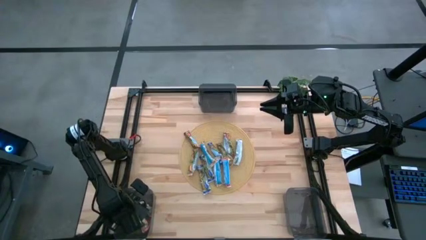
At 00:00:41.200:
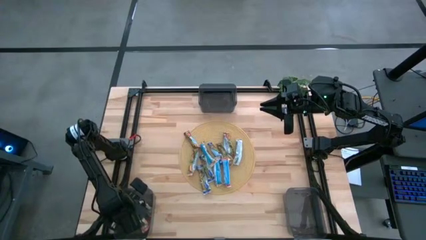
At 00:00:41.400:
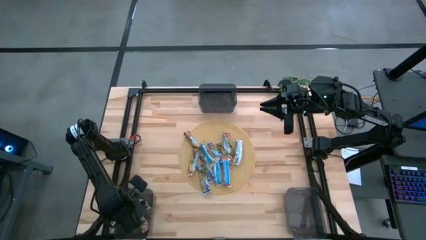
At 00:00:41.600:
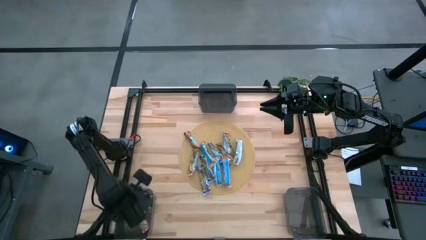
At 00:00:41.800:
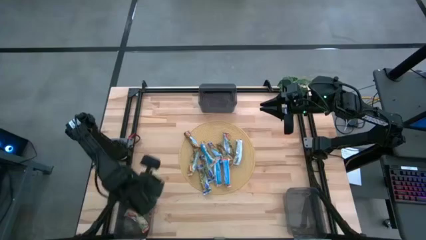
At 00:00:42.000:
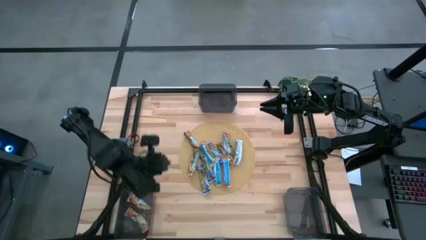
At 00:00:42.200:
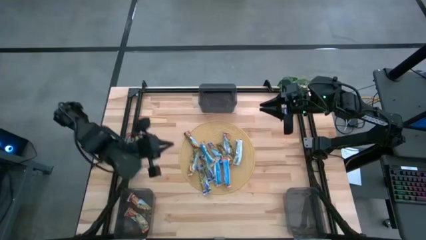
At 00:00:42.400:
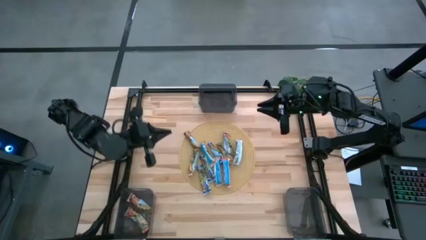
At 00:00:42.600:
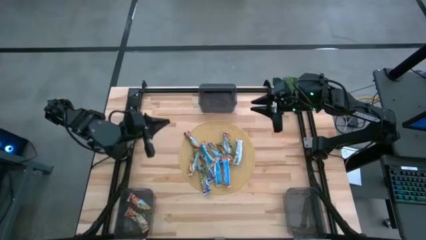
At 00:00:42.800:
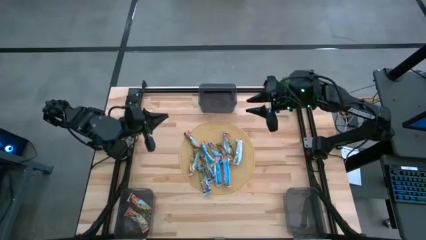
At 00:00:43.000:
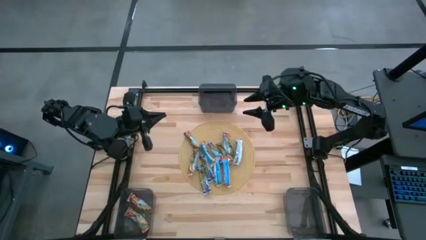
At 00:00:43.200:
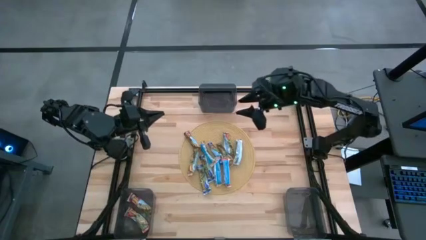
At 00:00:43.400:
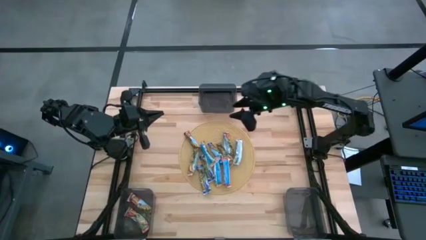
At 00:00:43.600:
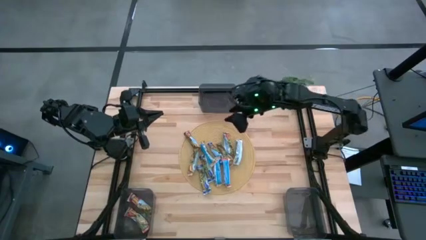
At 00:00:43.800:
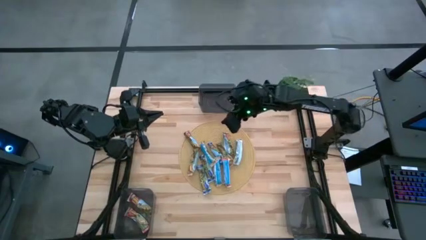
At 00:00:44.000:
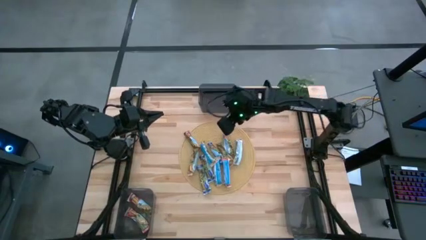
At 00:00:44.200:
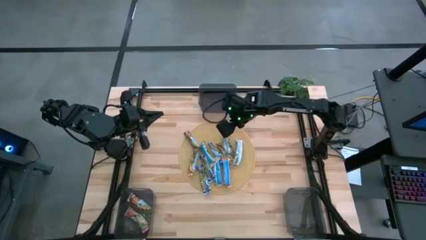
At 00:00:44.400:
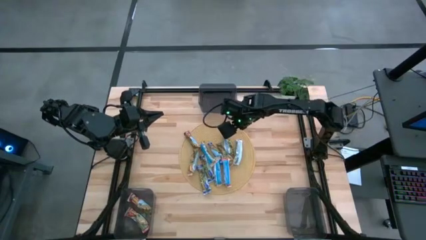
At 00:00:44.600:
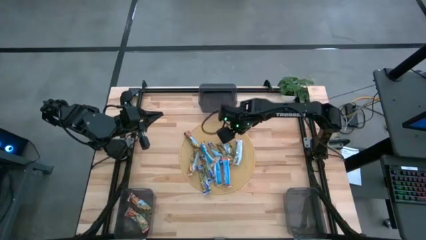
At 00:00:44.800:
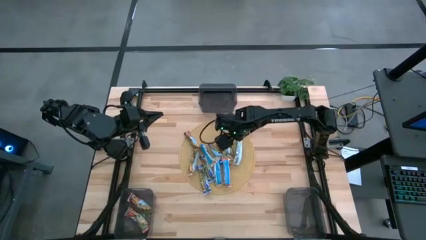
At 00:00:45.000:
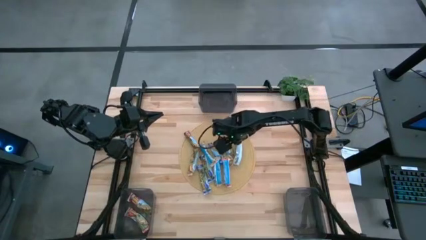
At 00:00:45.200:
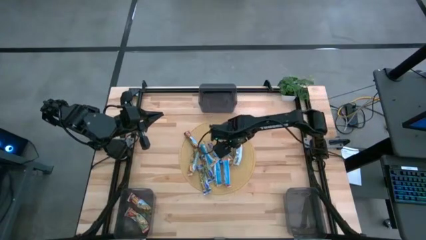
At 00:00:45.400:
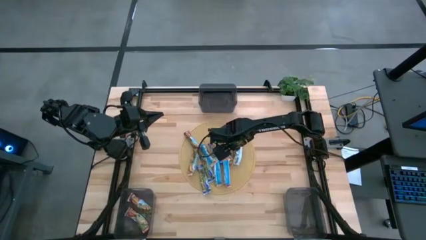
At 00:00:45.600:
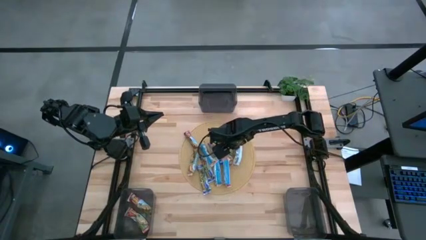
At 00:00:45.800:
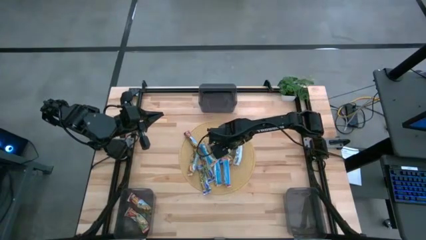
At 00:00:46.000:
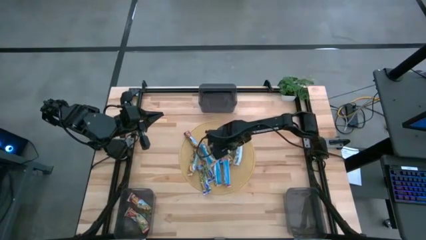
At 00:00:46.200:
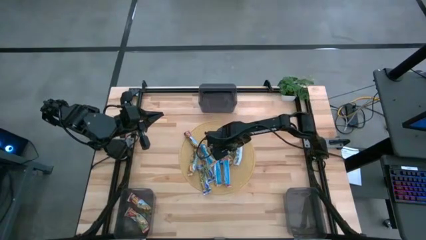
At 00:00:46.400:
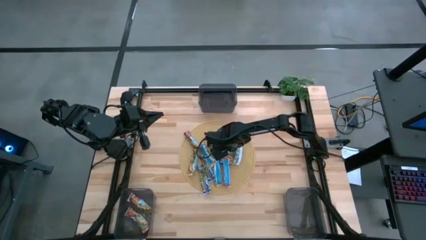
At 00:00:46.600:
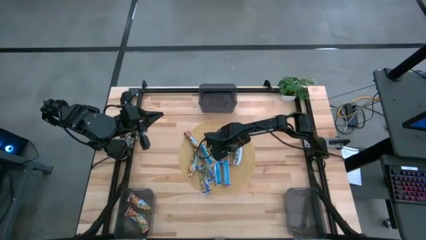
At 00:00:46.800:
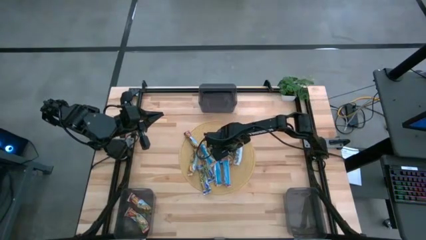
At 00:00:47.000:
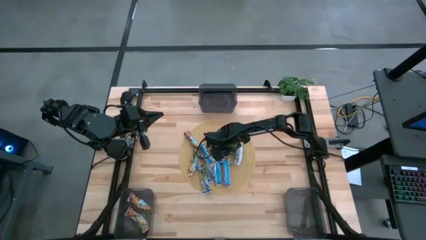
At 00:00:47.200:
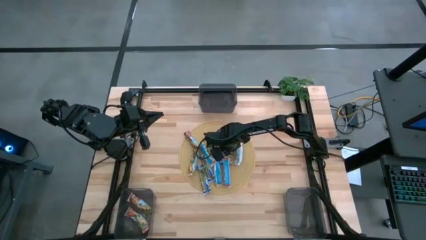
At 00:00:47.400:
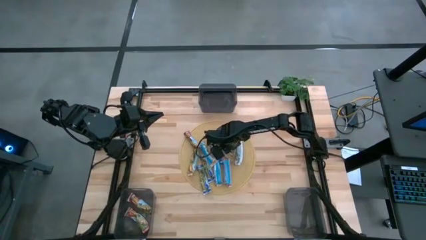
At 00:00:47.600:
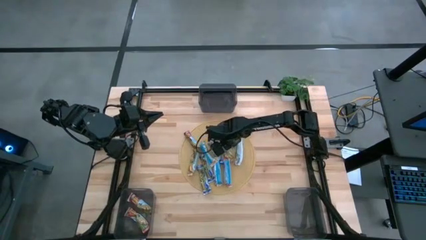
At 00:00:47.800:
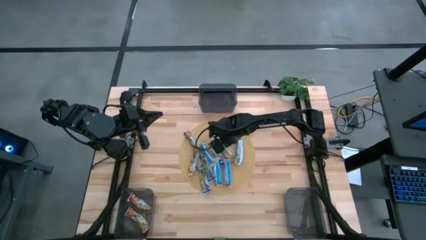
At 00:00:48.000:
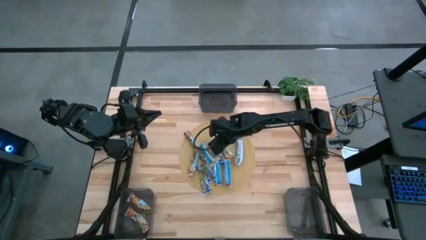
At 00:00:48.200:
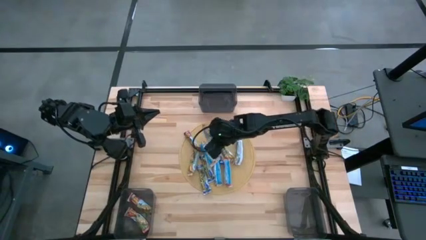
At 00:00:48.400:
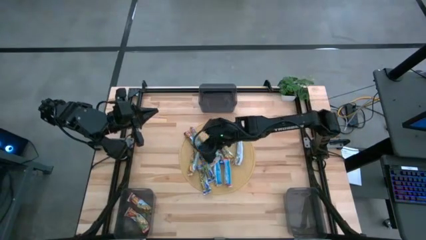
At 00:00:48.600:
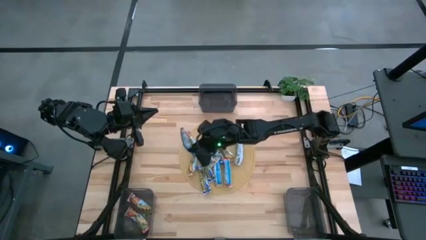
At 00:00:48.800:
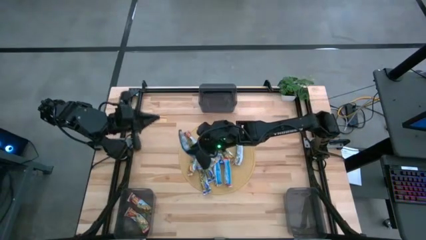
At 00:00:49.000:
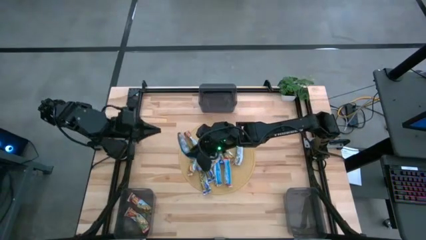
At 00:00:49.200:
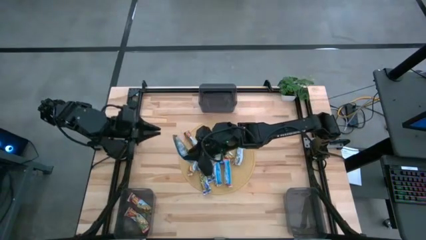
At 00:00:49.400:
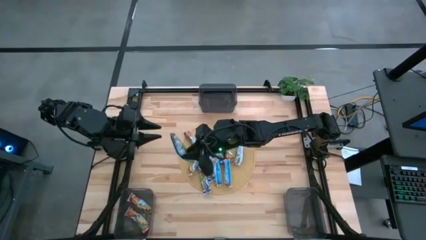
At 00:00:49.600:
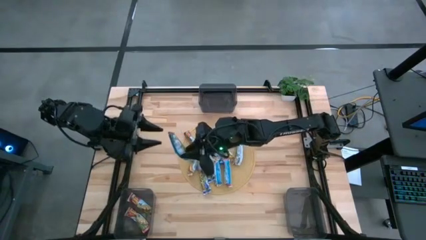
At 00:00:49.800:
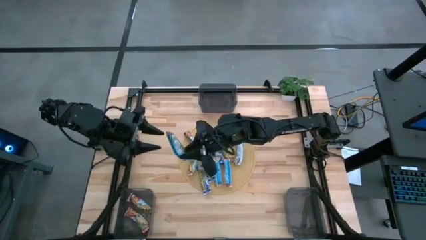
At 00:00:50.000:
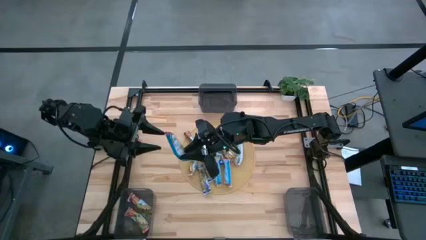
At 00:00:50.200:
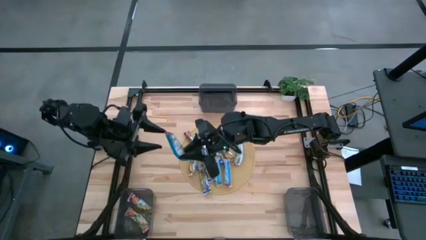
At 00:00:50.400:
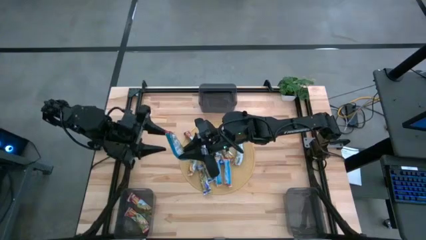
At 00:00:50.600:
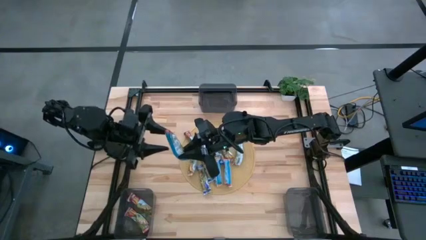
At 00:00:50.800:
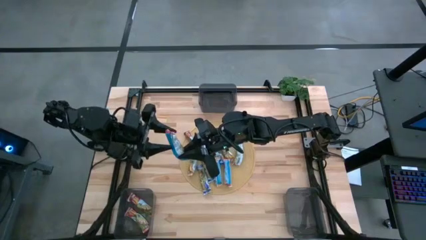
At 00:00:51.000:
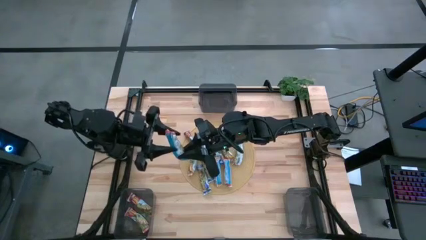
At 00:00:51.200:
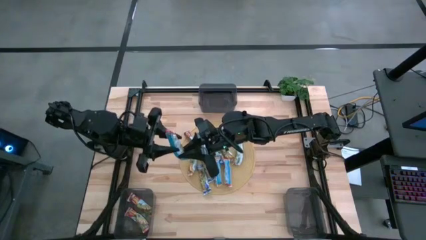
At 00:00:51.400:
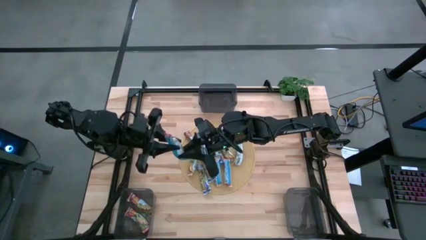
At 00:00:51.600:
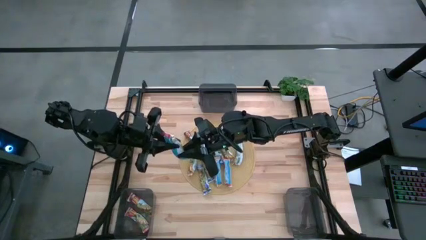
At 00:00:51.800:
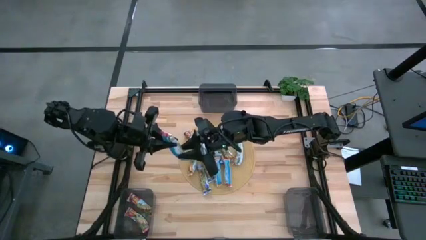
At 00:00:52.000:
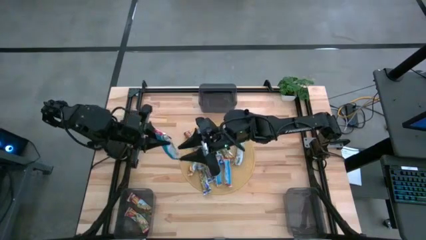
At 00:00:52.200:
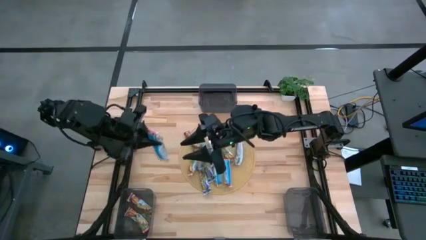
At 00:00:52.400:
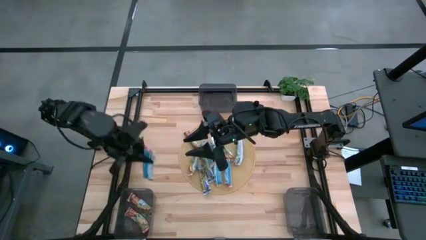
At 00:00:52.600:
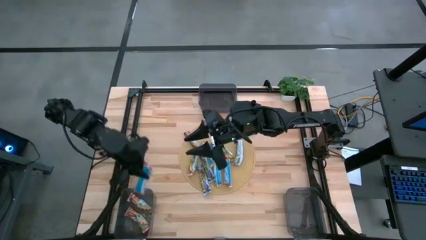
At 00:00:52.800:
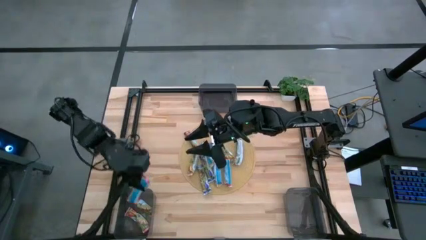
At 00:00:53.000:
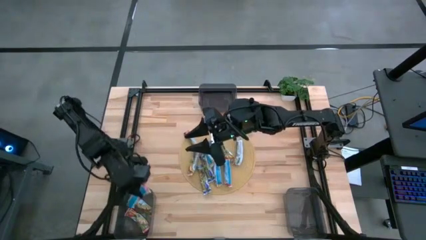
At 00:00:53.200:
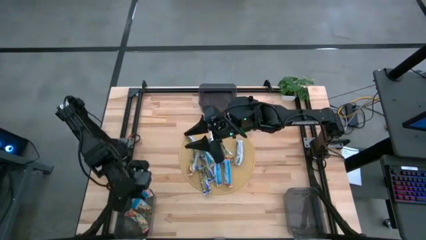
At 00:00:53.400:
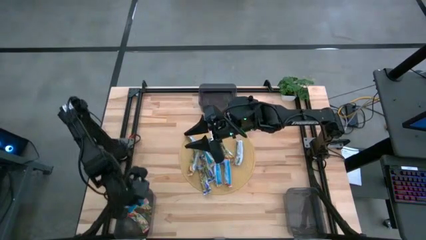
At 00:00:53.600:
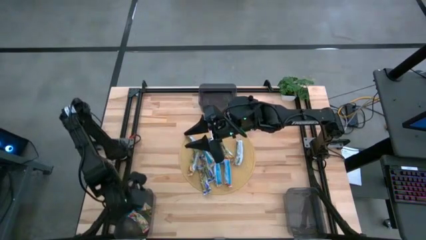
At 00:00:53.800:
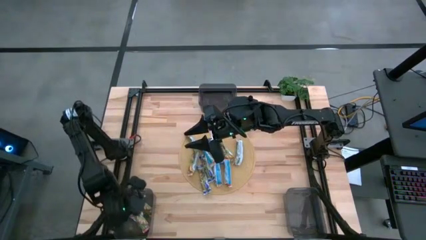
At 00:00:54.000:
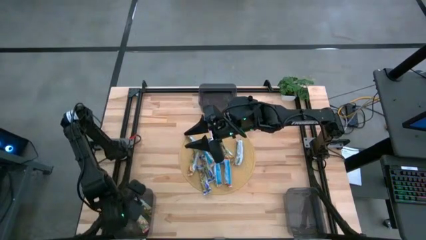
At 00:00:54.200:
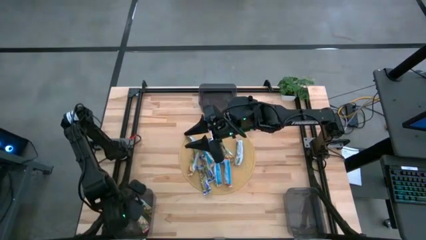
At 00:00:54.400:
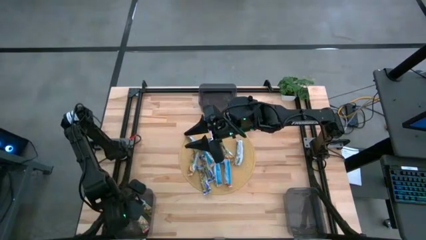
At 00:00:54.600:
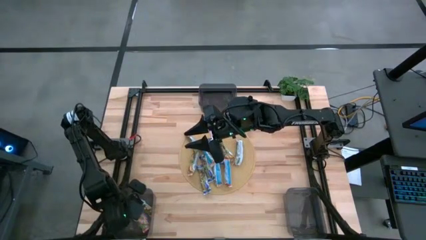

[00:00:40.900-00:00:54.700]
Task: Pick and place Granola Bars by type
Put the red granola bar into the left black bin

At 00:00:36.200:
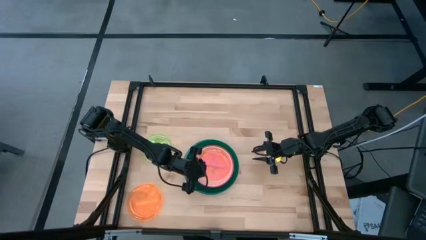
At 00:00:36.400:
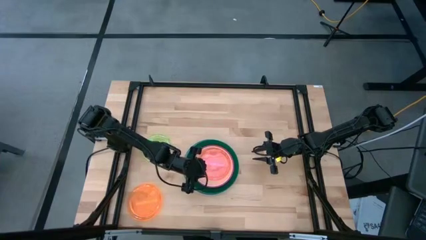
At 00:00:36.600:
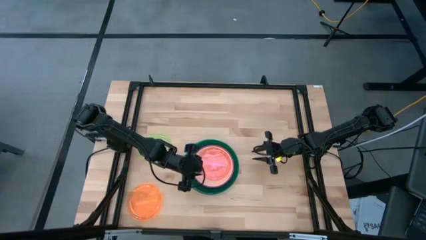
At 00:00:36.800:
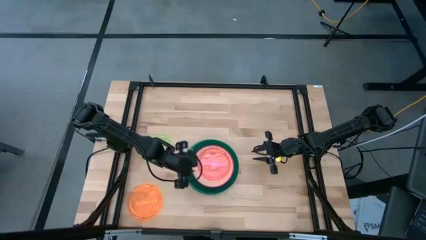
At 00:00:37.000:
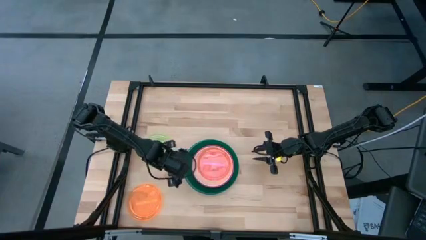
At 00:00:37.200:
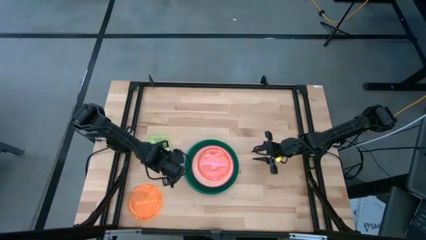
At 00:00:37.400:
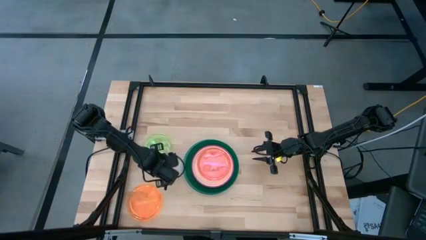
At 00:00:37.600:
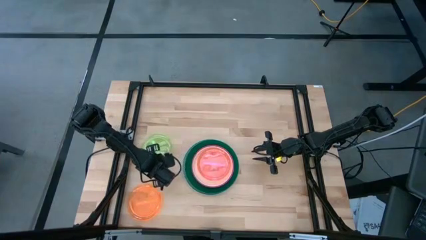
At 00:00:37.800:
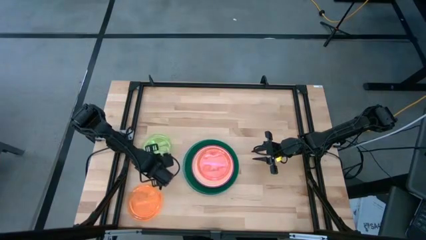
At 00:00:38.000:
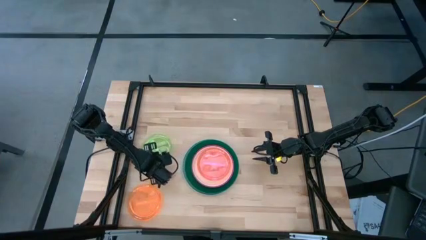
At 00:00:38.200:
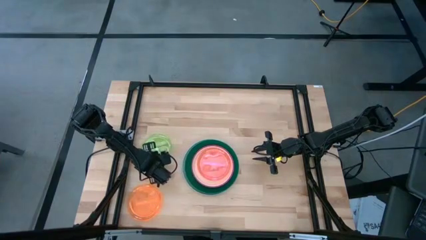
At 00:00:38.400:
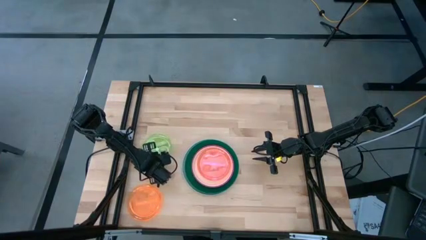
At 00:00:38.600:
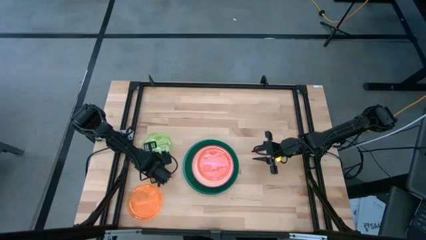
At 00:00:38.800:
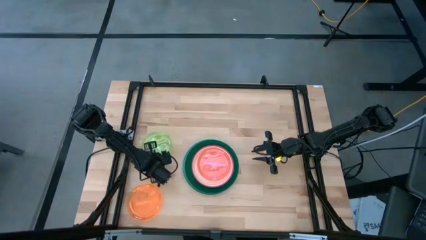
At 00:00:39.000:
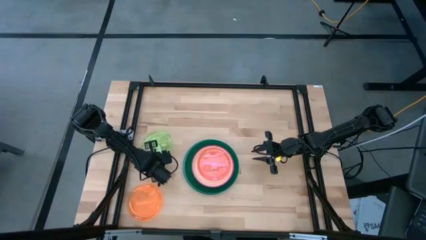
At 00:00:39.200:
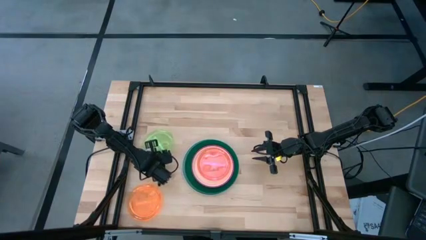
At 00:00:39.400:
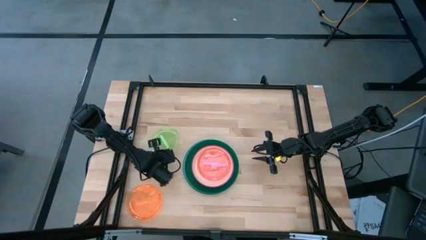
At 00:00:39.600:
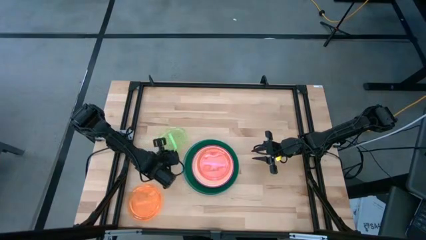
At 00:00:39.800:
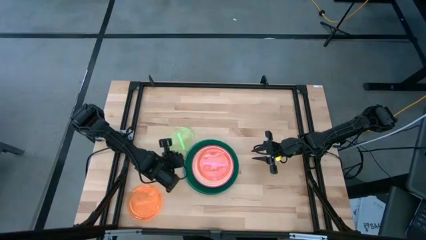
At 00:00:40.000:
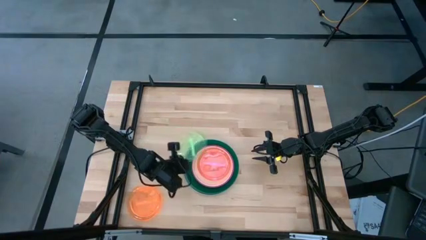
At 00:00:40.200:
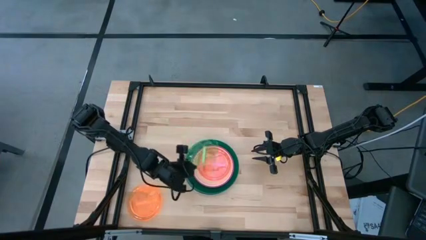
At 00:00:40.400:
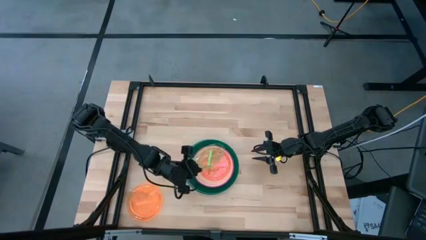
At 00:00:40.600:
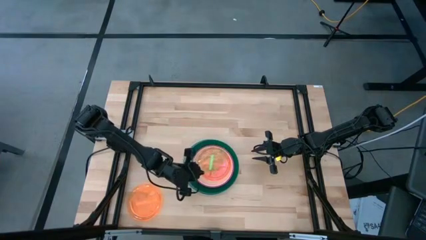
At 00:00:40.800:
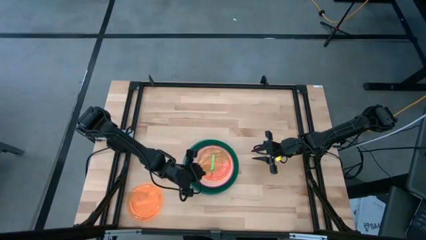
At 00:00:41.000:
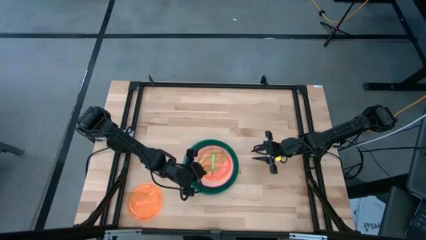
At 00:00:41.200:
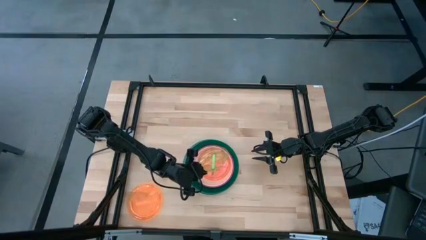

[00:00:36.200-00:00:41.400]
Task: Stack plastic plates
Stack the light green plate on top of the light pink plate
